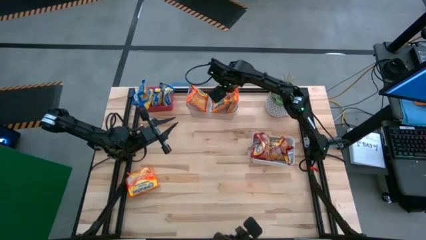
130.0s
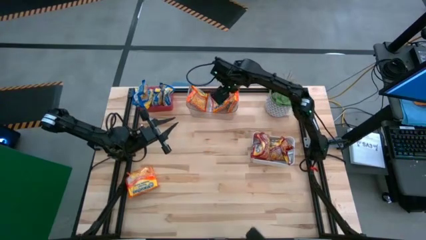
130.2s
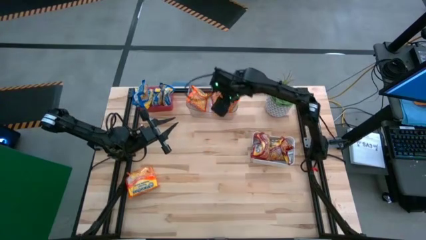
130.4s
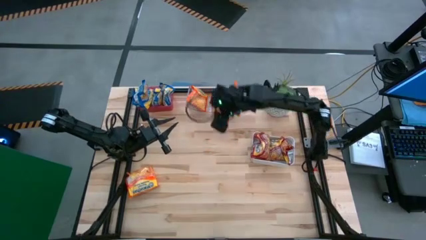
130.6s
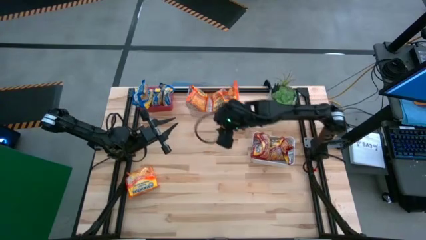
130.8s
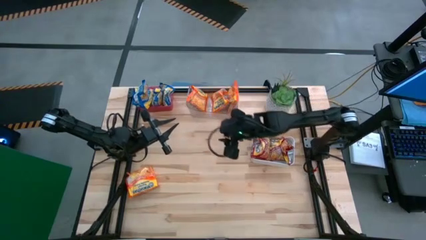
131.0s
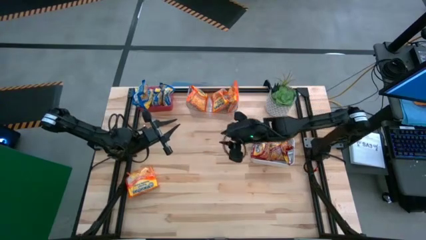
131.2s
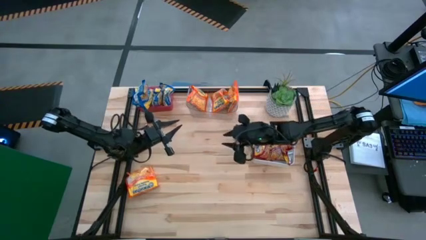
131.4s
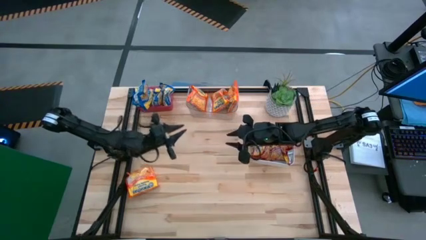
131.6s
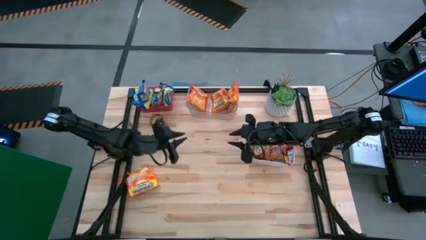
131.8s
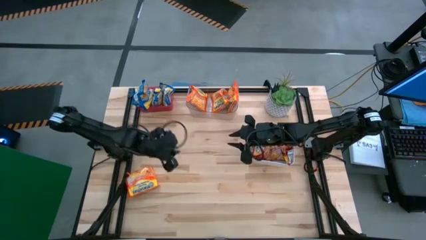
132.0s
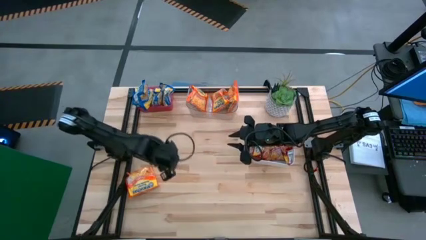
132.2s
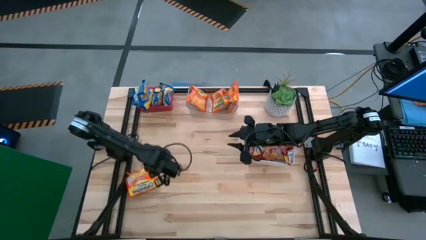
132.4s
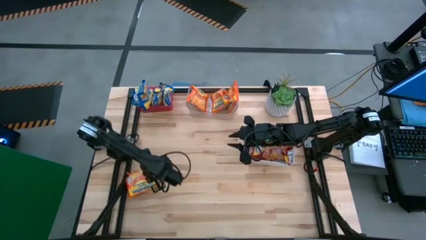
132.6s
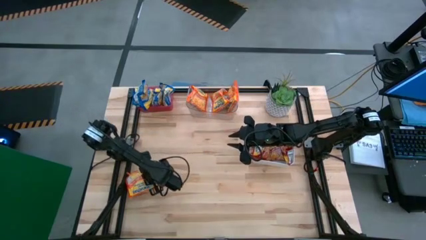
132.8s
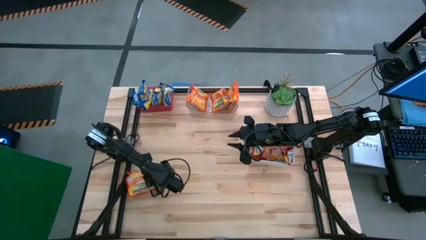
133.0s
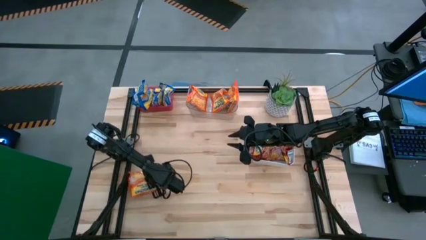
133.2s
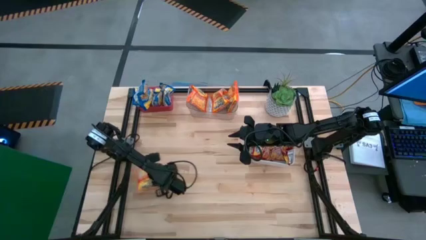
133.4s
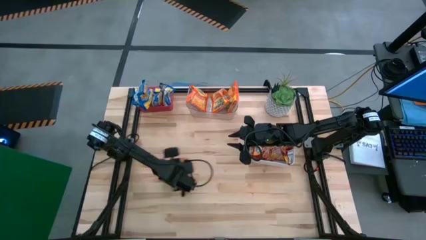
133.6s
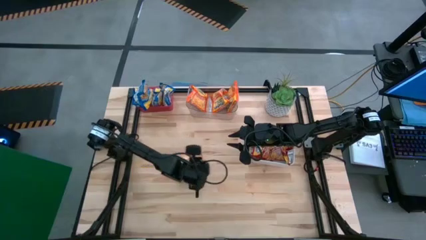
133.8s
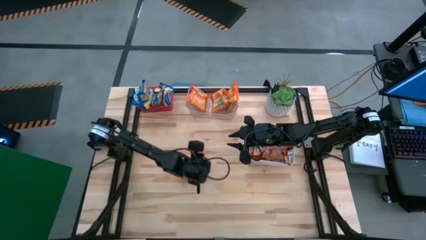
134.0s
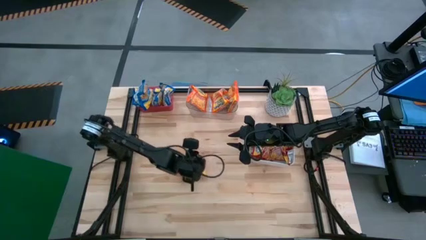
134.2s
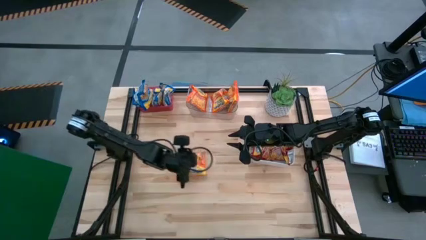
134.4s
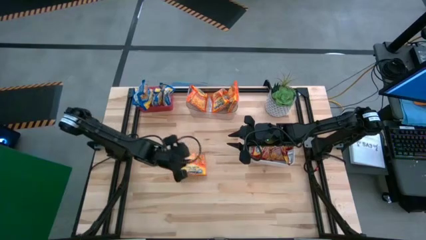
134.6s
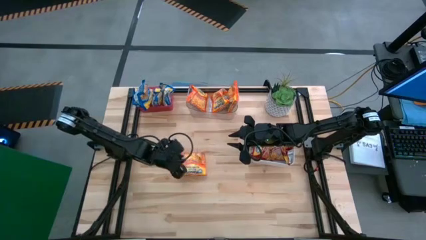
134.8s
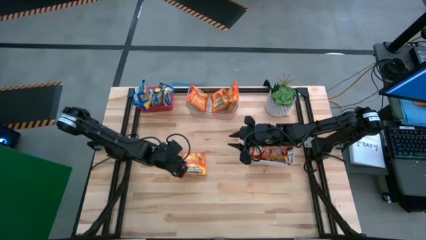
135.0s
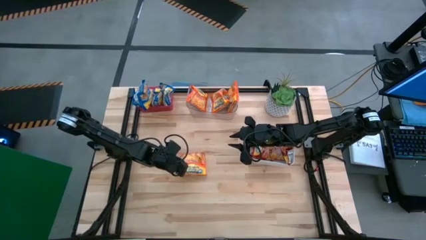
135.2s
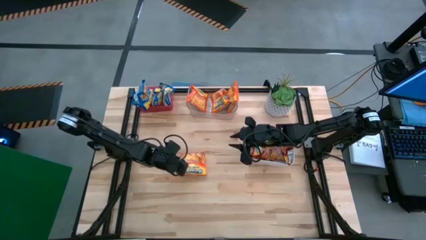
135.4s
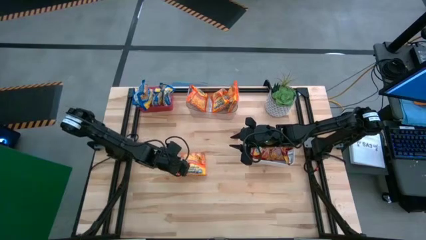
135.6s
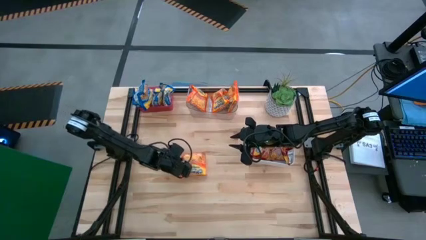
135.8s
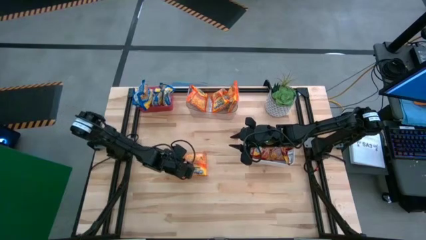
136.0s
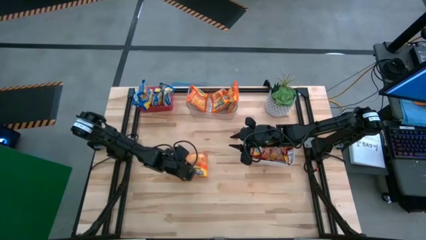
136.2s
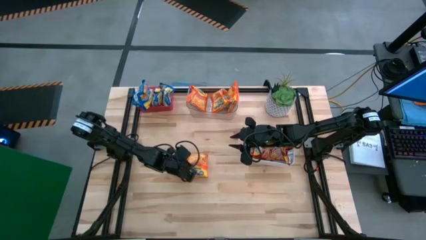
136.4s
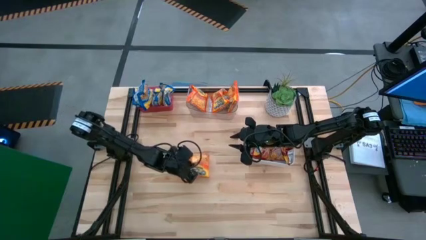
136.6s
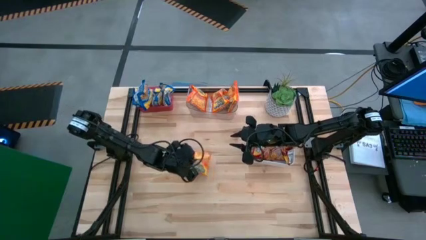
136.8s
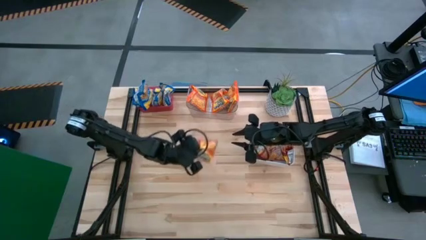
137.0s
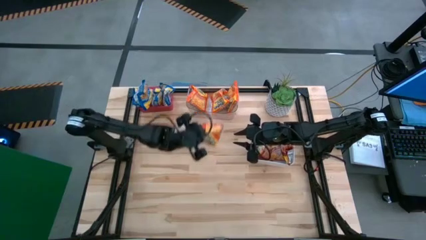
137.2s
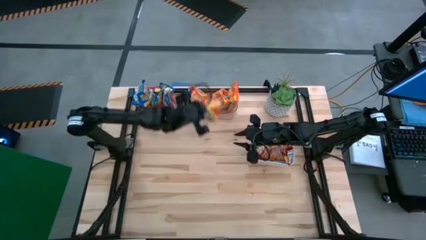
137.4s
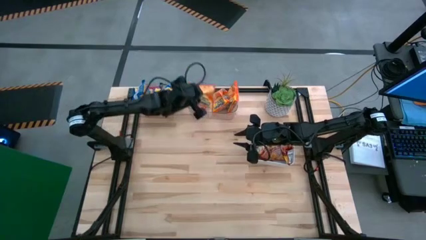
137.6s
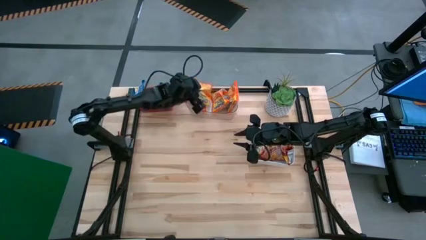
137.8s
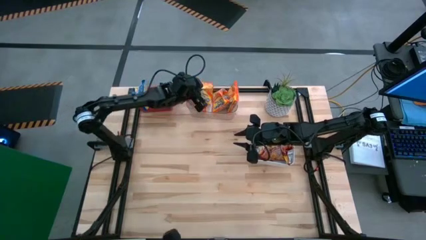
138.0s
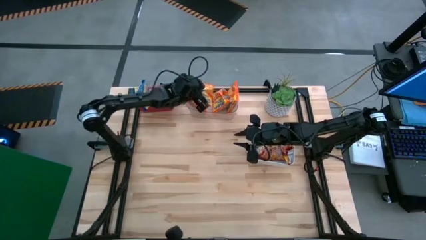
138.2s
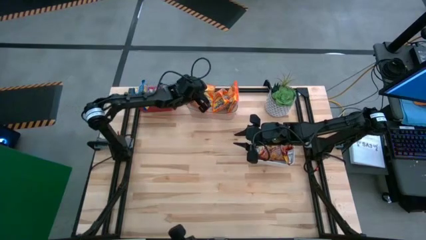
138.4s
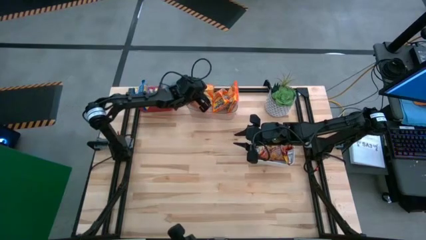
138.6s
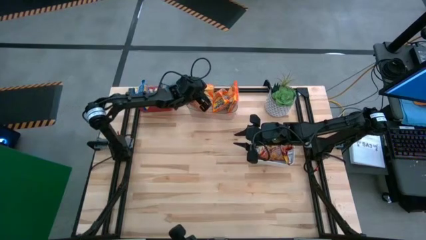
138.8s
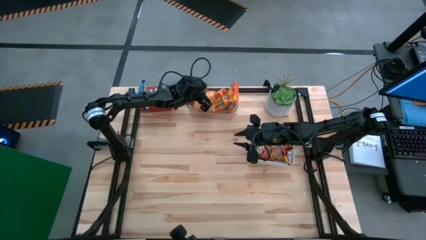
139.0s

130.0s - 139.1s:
Task: Sort Maruchan noodles
Put the orange noodle pack into the transparent bin

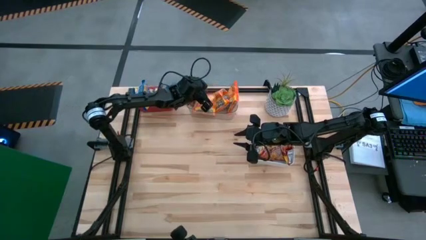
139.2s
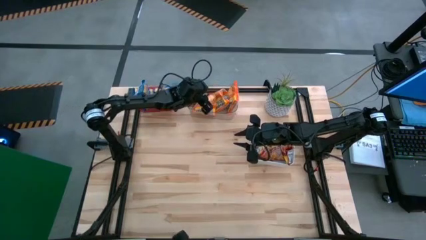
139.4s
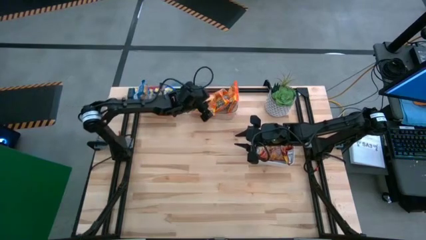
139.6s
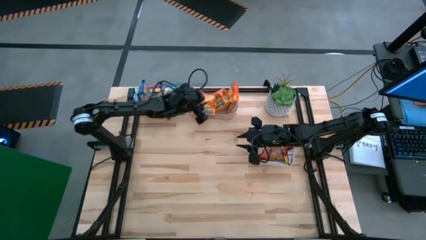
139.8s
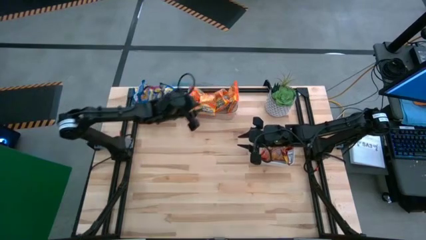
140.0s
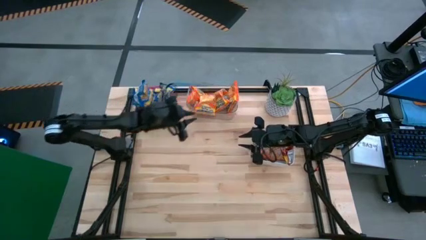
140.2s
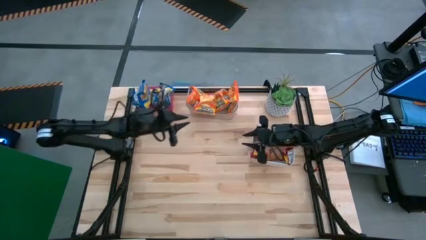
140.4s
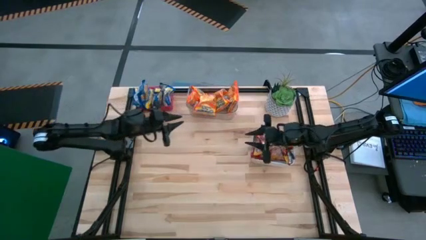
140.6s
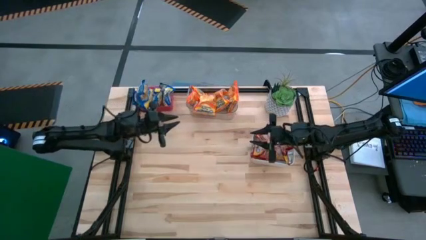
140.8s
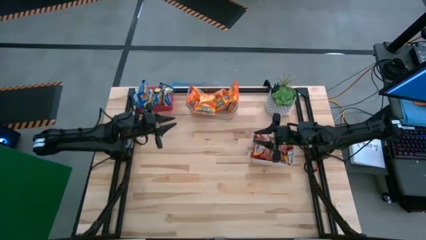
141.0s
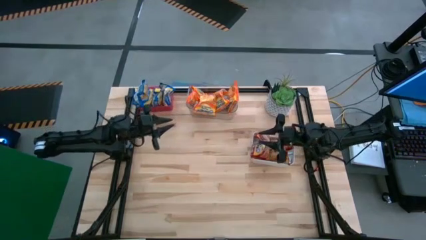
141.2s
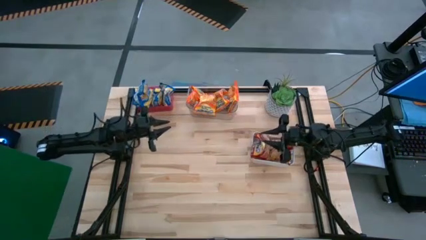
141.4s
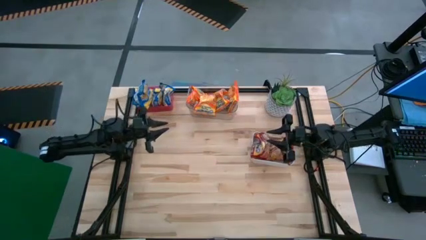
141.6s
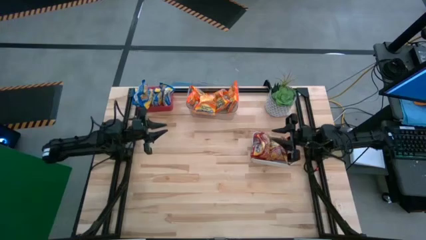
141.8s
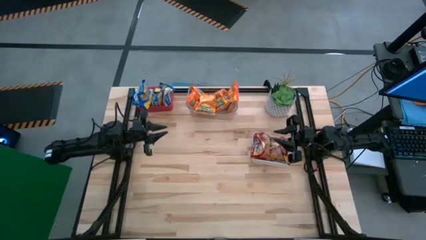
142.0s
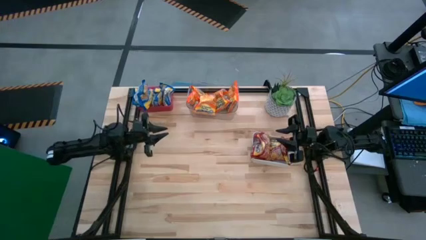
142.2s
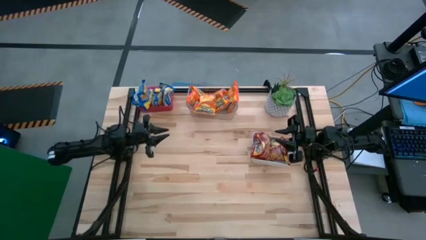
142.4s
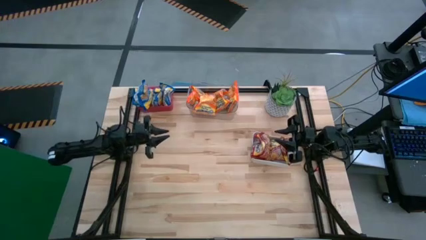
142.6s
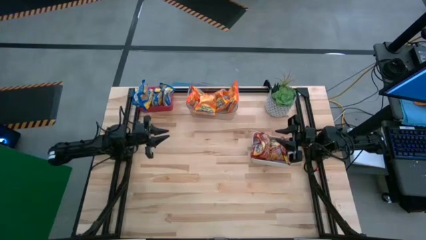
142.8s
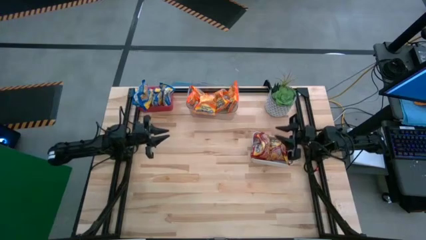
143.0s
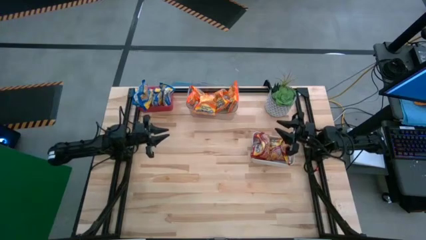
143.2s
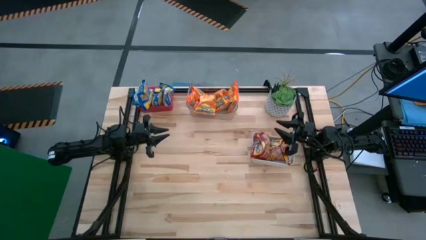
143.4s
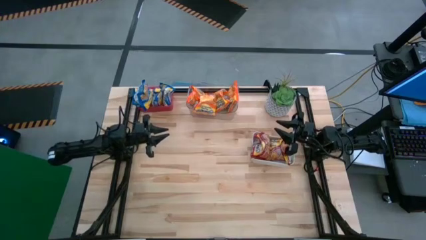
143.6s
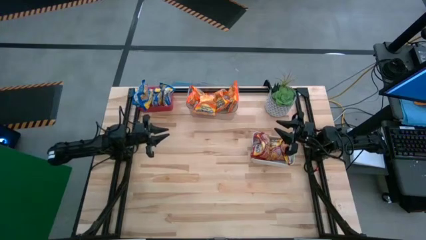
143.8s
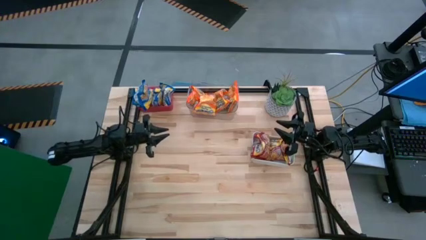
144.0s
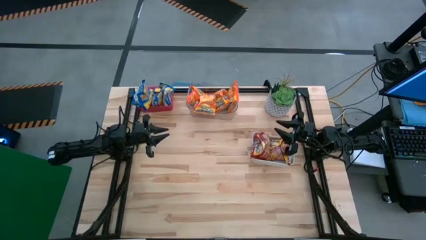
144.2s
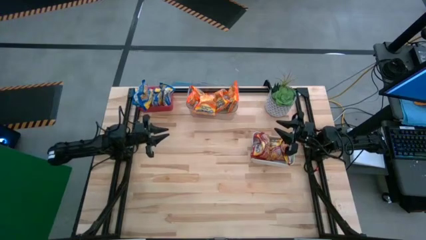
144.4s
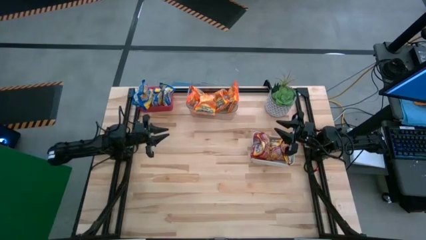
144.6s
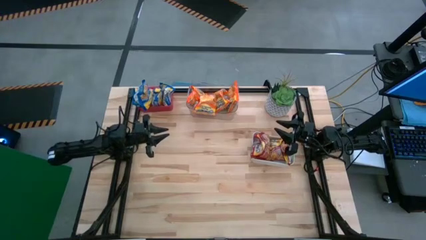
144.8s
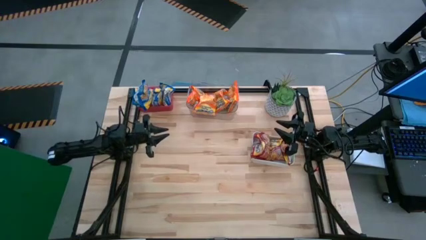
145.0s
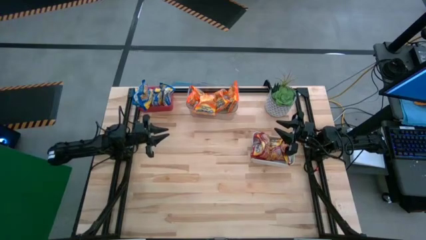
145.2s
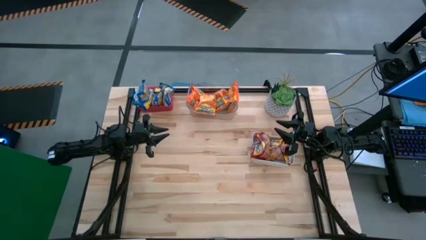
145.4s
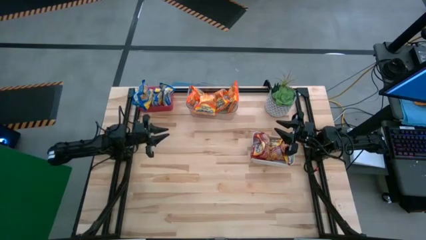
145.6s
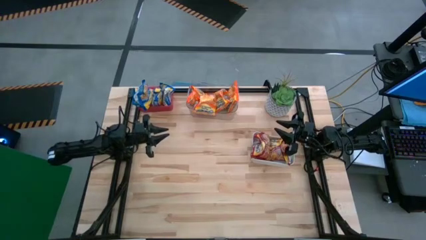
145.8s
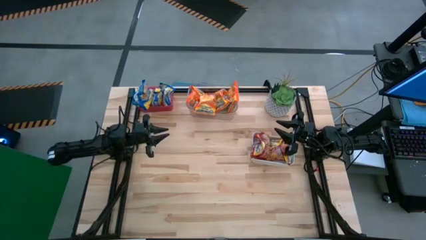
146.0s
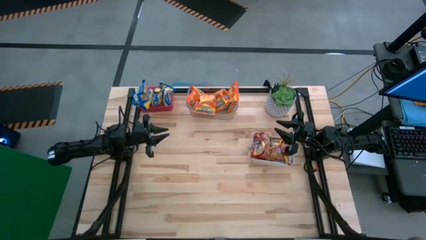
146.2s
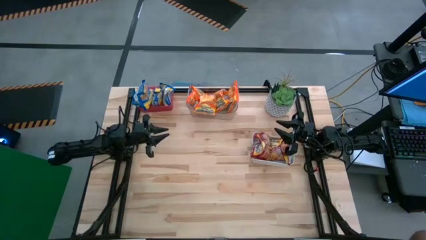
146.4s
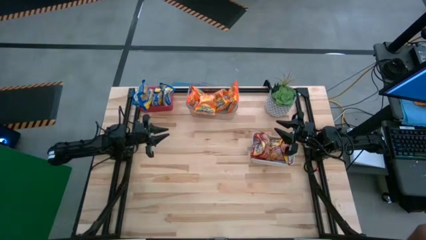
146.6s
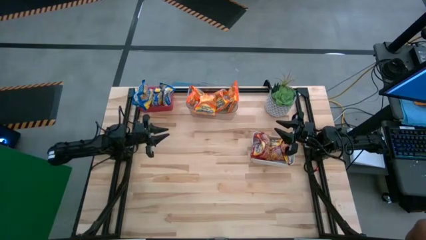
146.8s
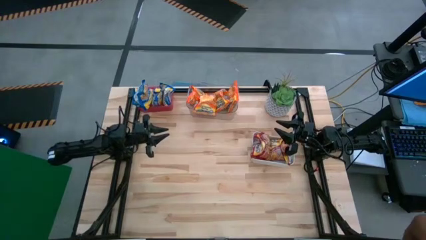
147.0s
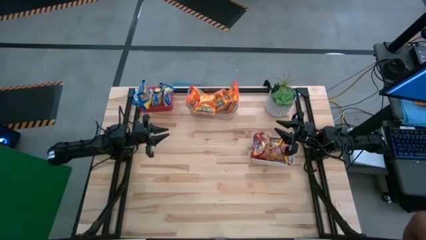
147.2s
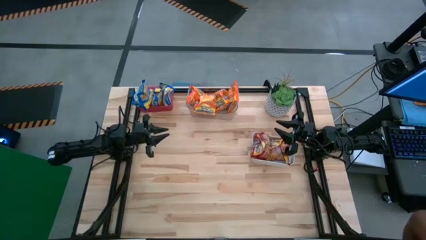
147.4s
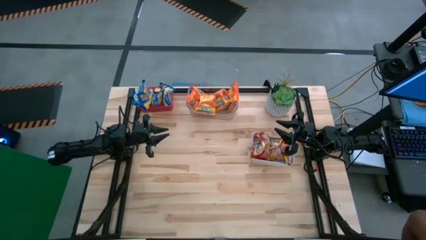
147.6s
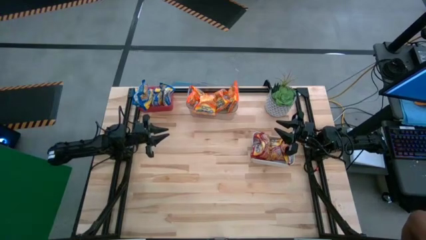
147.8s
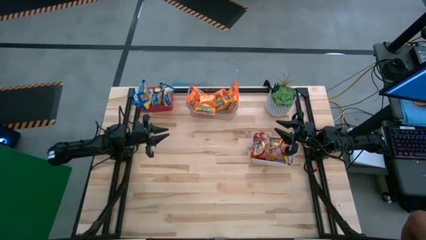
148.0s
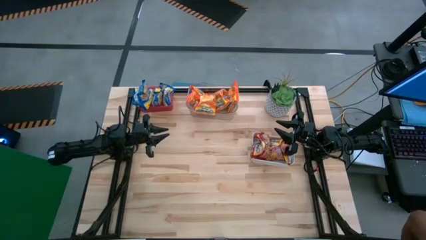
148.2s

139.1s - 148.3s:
Return to Home Position
